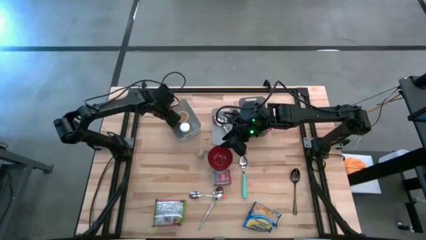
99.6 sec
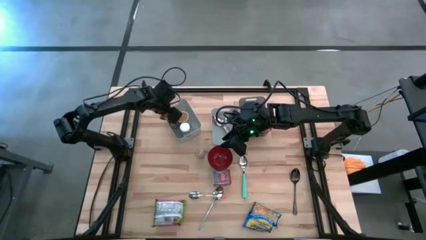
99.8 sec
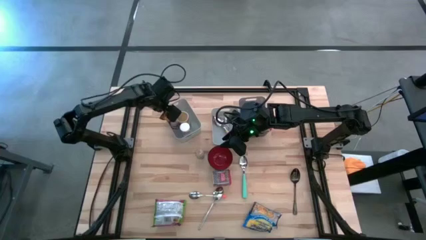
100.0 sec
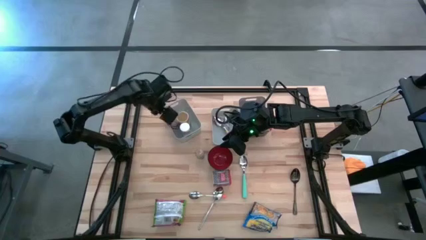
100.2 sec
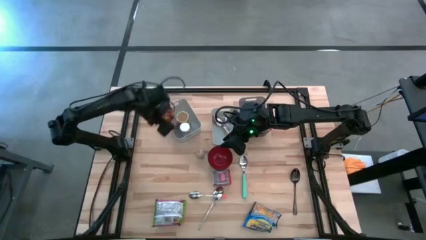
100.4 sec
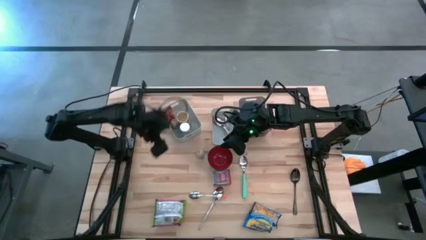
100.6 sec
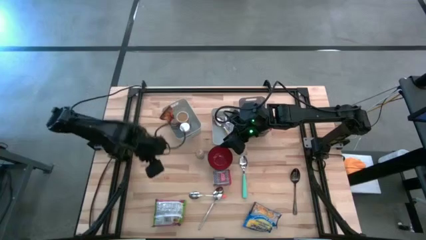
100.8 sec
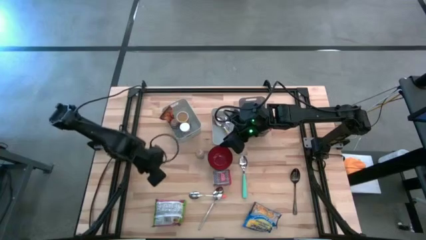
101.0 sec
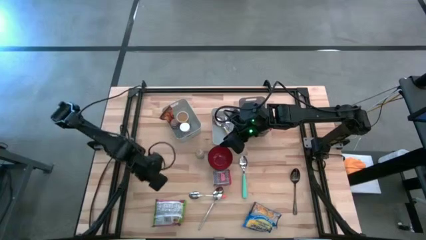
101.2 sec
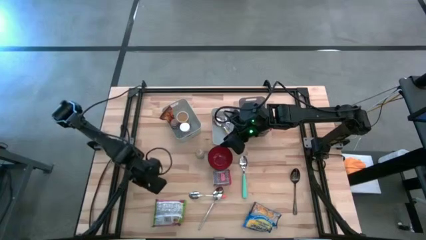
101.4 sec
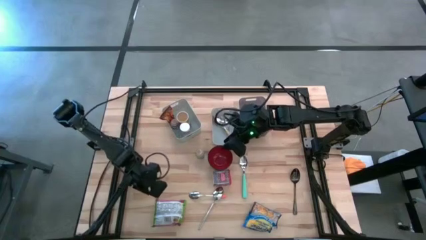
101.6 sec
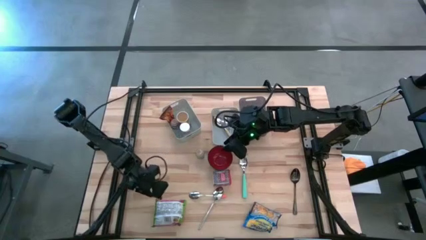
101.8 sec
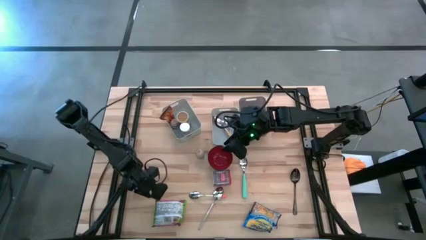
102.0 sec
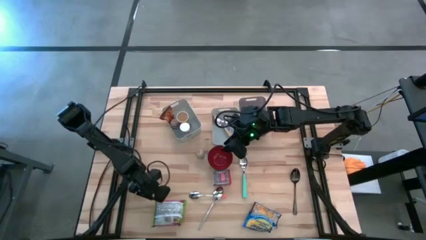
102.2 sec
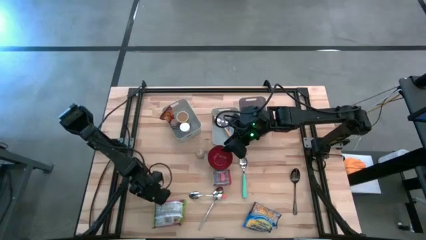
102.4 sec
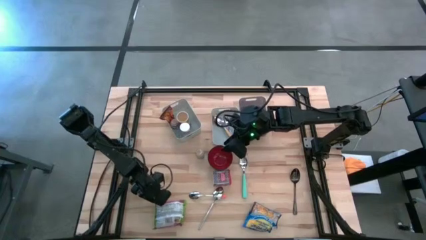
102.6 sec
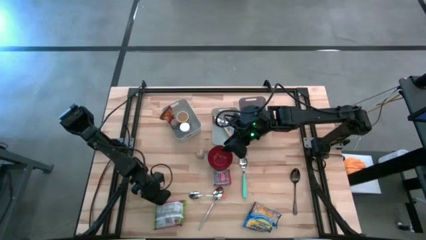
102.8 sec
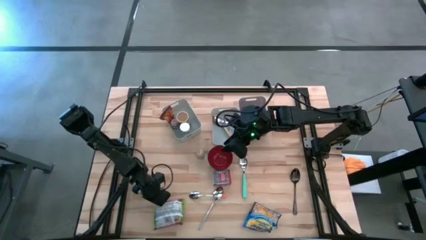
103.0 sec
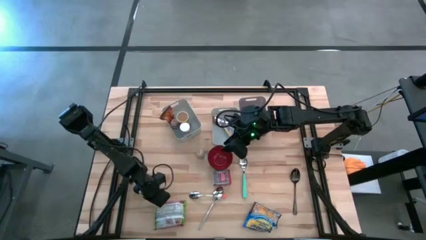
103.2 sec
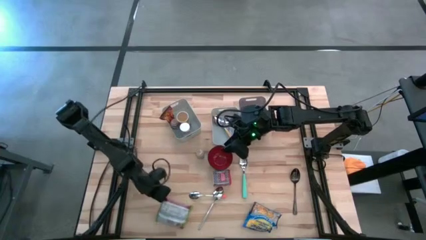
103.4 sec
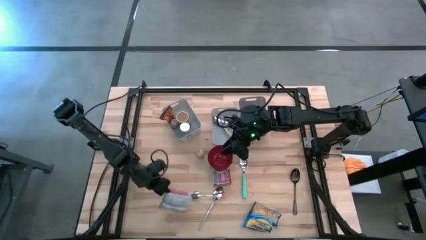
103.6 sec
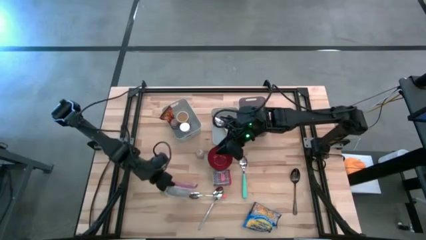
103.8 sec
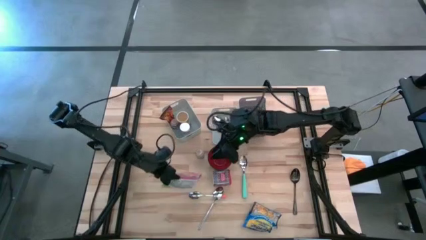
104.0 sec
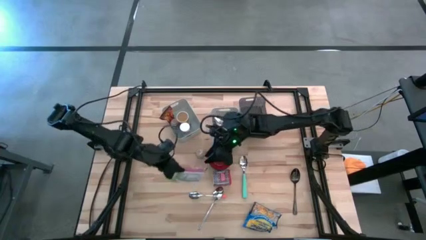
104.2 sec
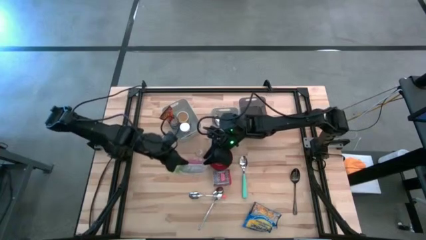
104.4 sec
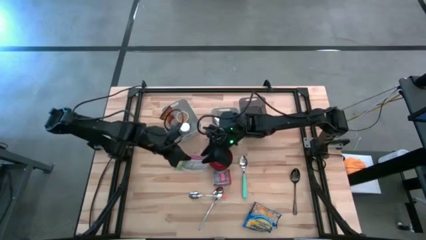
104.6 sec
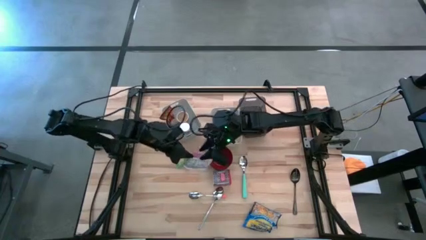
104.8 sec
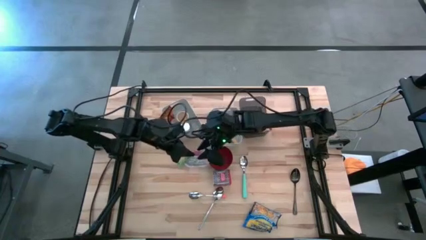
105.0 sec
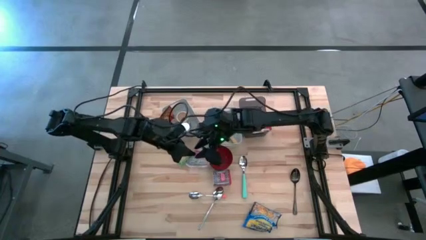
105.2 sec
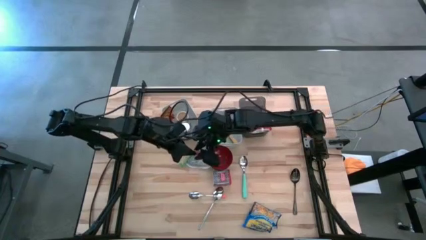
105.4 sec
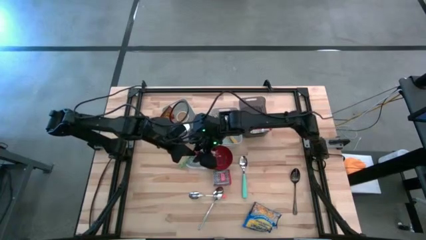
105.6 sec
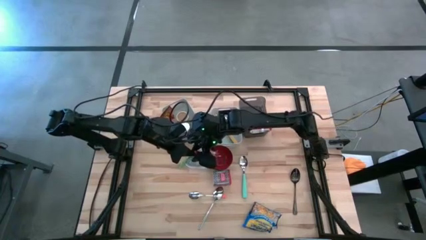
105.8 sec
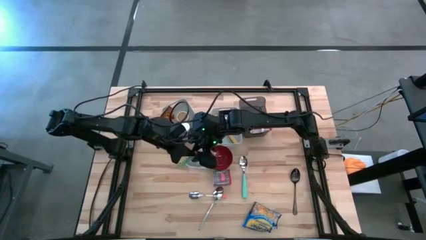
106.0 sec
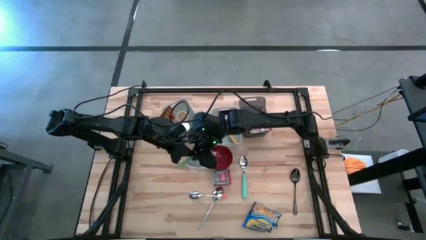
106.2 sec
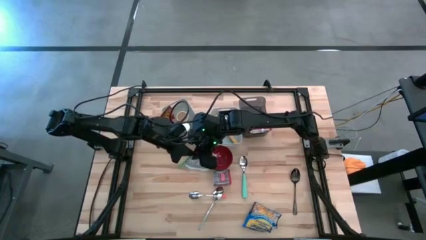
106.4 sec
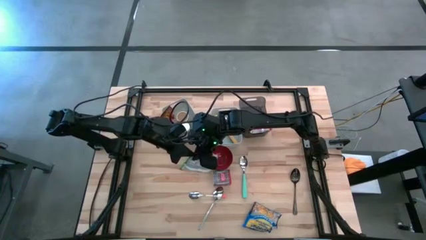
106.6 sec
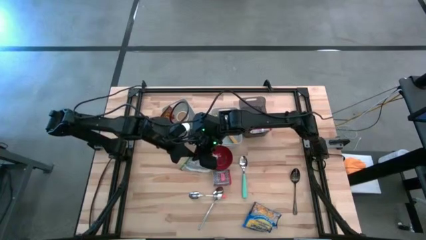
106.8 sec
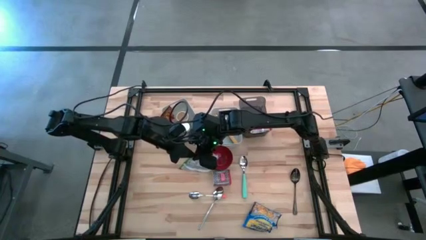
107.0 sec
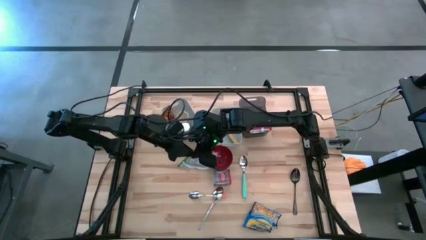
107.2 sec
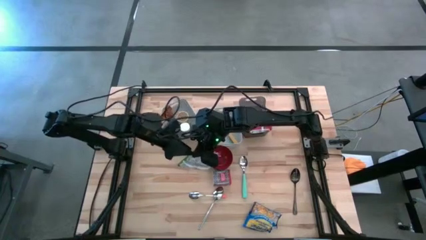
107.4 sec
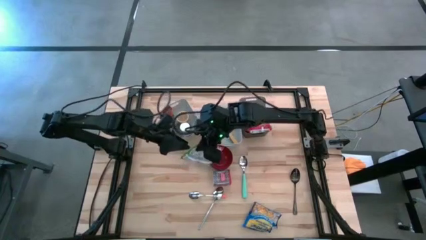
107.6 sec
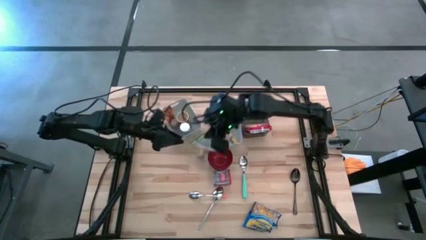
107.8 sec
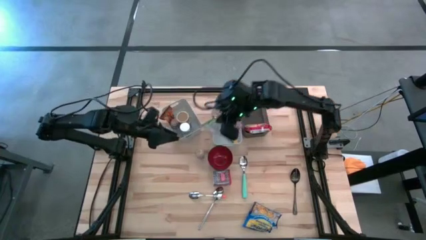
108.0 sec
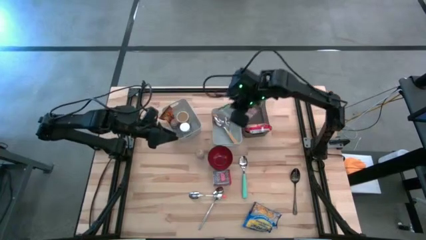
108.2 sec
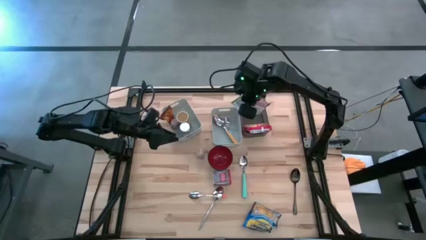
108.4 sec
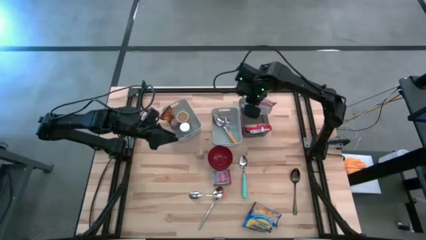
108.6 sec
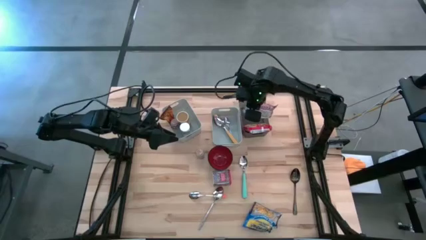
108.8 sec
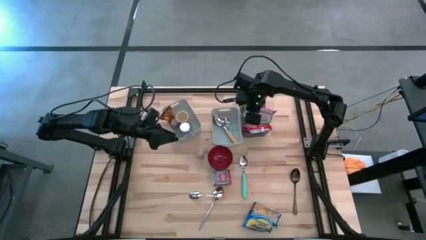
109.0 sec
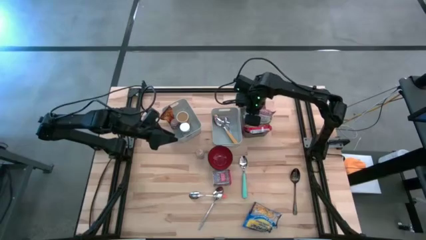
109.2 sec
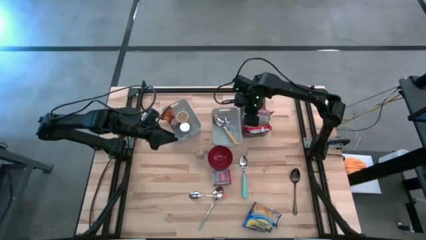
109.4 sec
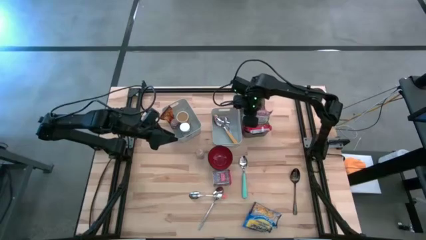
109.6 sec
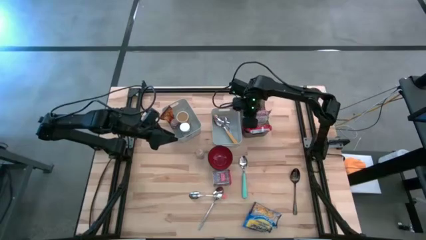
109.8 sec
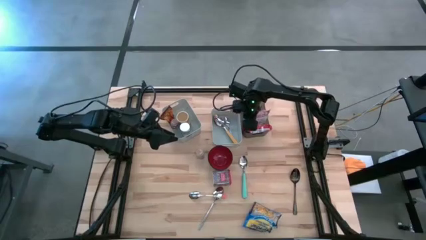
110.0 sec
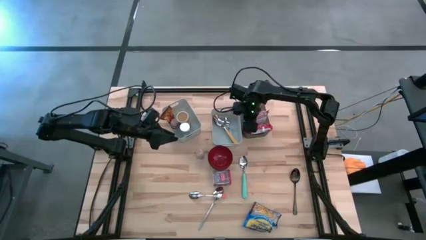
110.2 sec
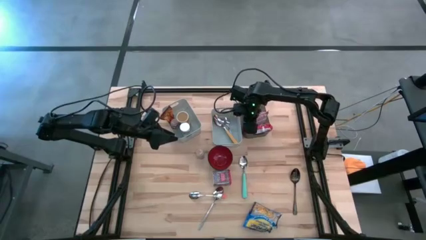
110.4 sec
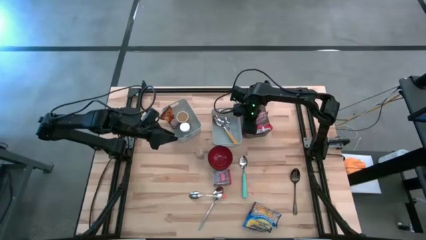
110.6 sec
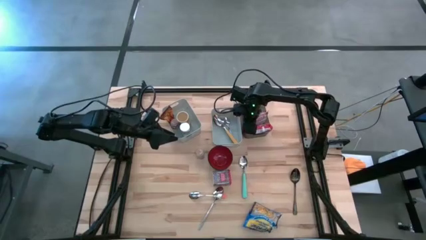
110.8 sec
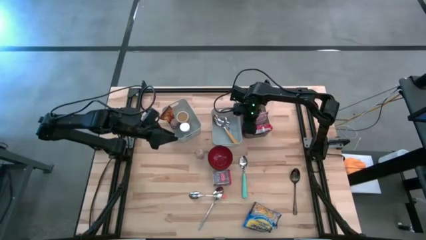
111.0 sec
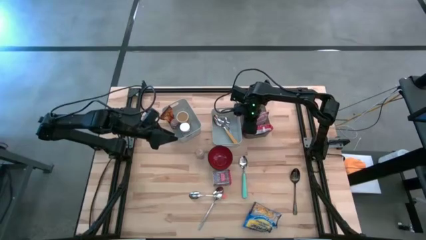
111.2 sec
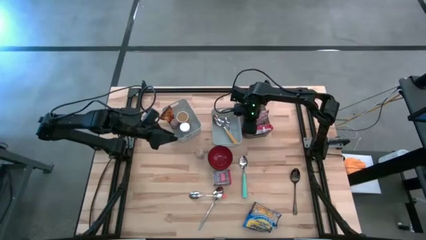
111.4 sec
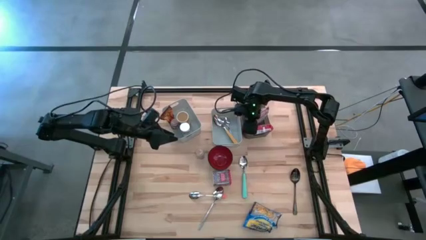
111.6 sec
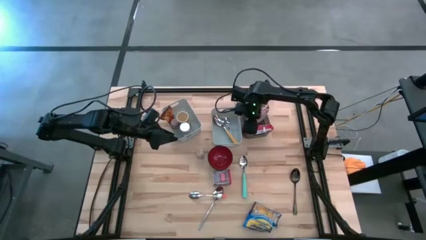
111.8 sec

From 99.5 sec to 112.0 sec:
Put the yellow noodle pack into the black bin
